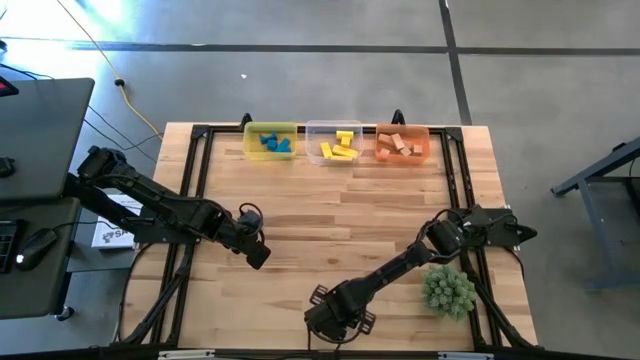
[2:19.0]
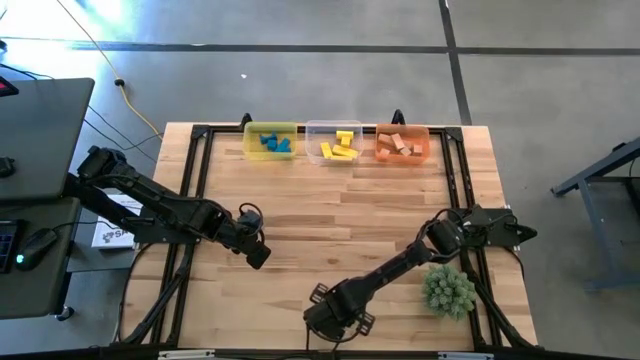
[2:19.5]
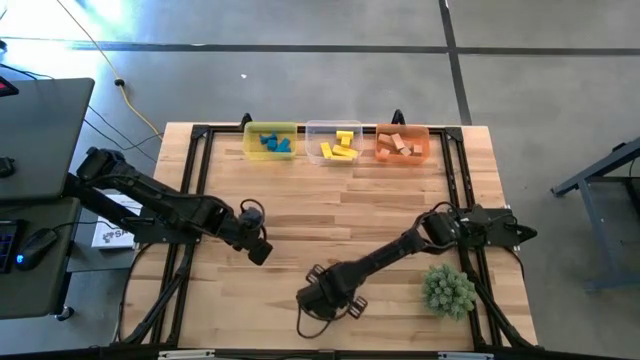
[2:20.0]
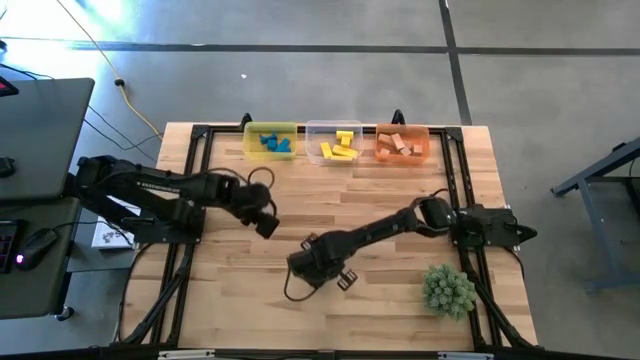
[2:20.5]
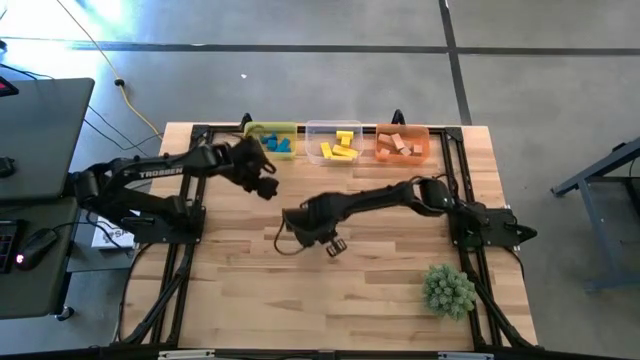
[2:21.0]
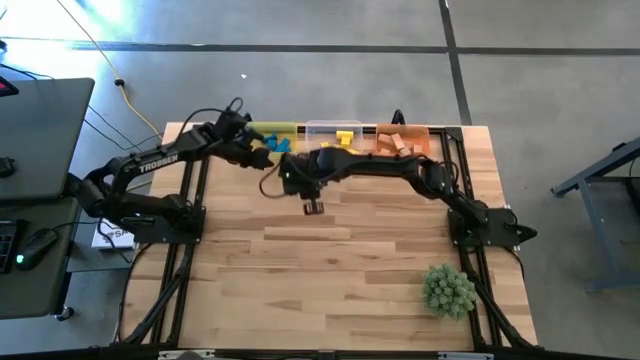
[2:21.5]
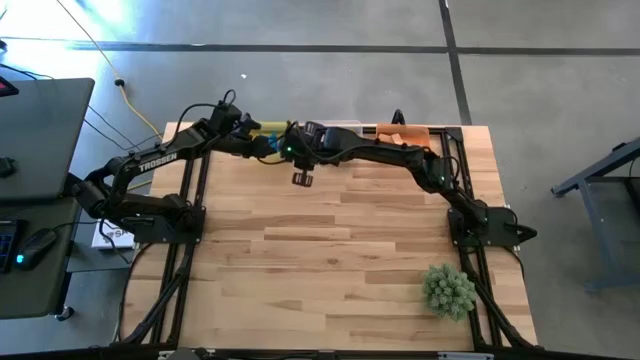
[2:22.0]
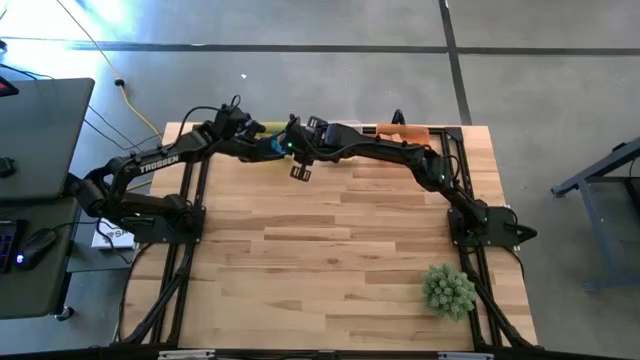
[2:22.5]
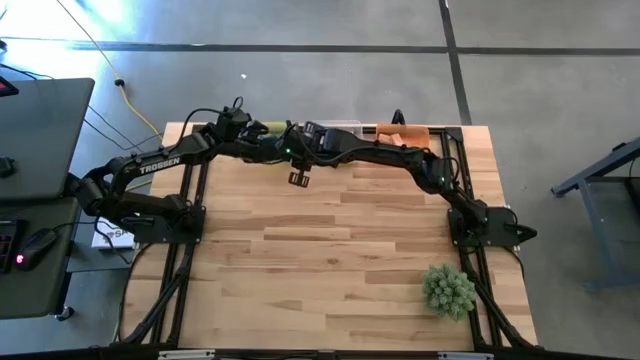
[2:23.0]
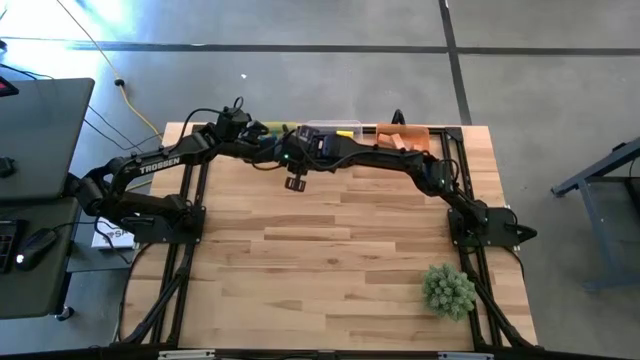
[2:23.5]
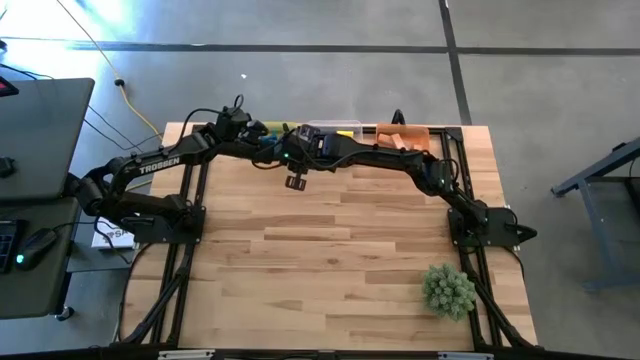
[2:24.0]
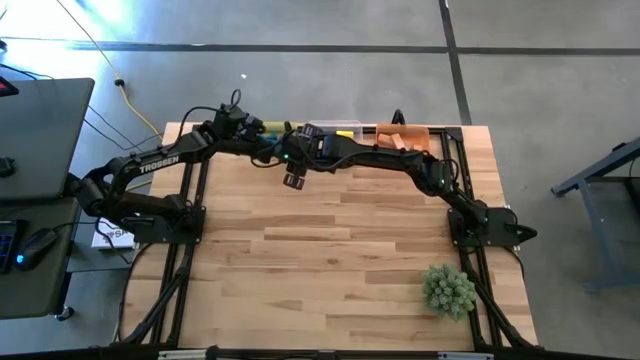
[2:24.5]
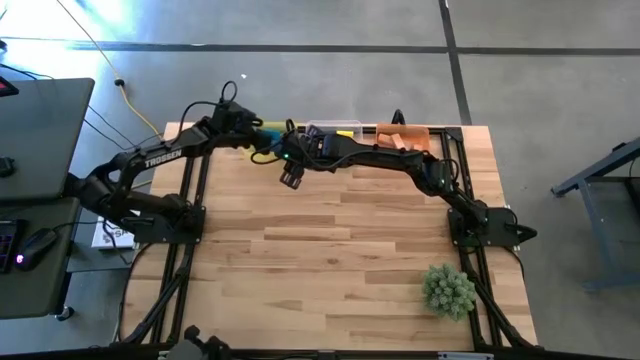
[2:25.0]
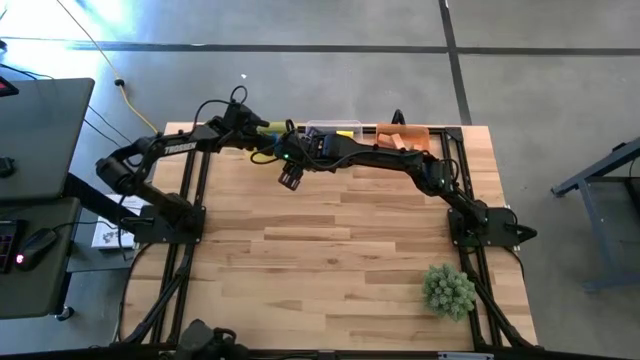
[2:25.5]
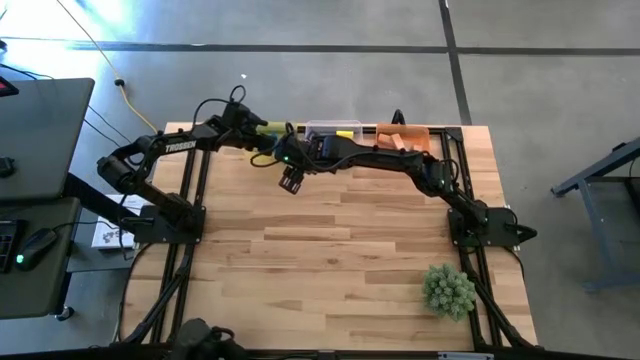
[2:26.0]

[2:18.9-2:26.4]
Task: Sort & place blocks by color
Put the blue block into the yellow bin

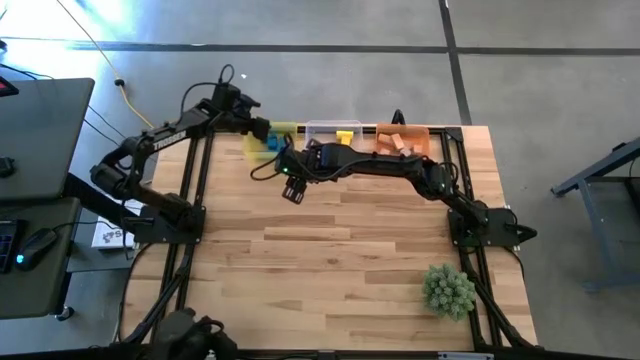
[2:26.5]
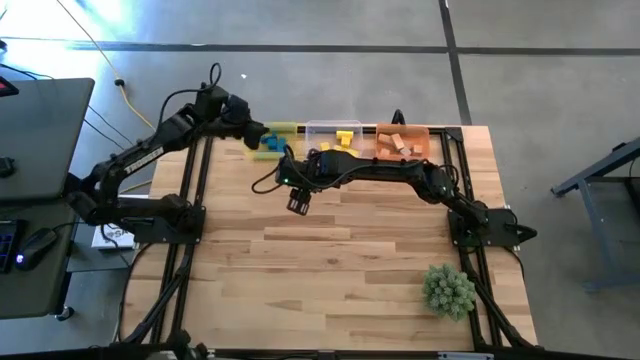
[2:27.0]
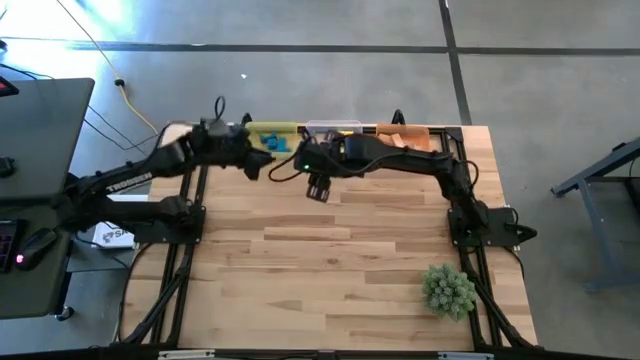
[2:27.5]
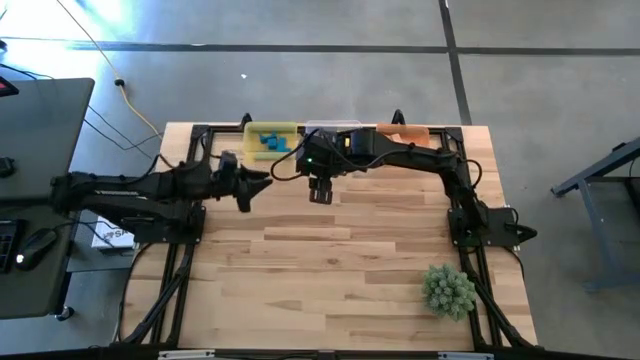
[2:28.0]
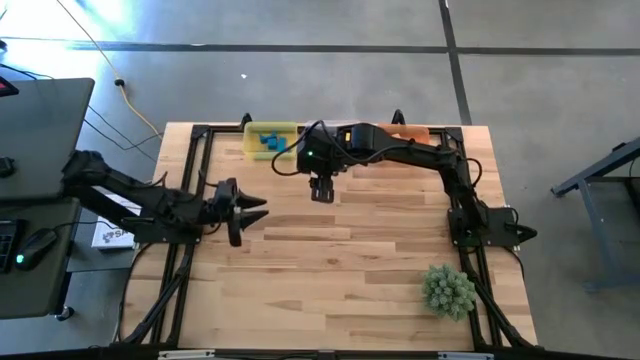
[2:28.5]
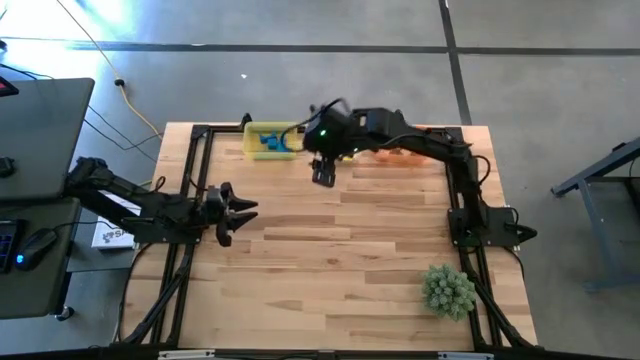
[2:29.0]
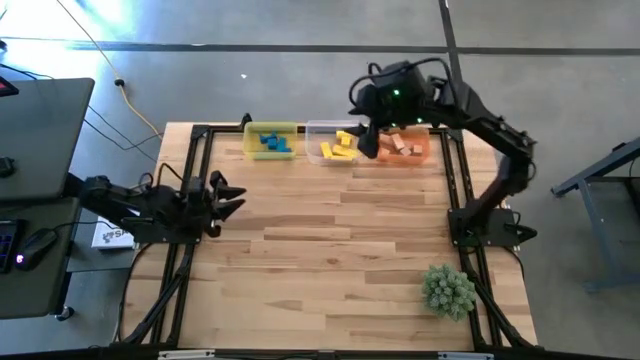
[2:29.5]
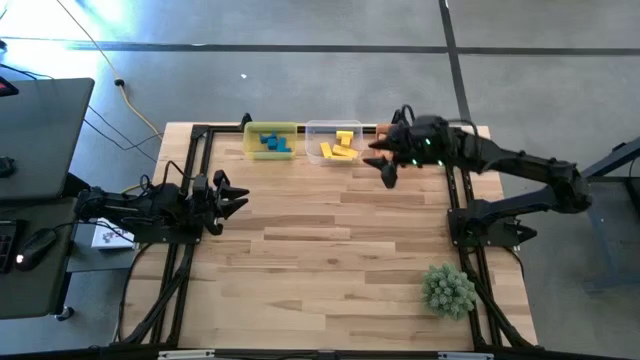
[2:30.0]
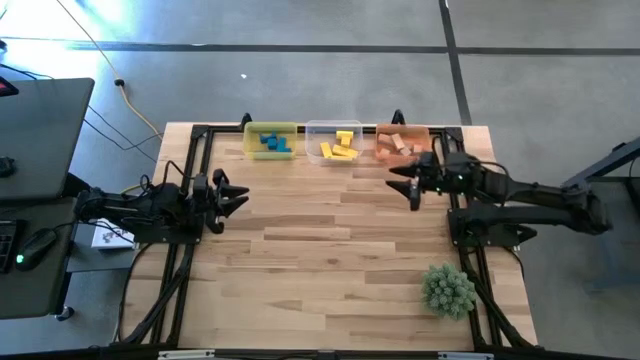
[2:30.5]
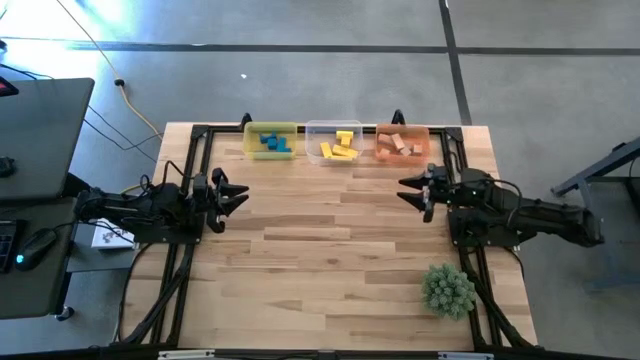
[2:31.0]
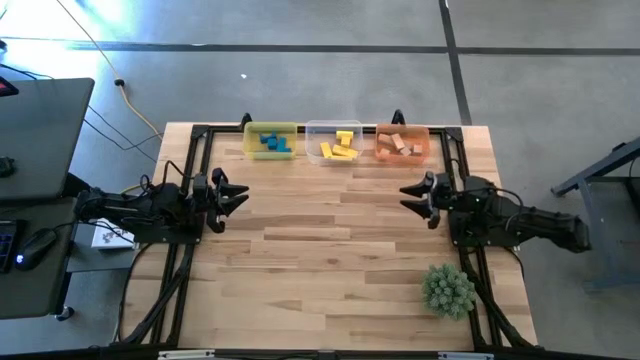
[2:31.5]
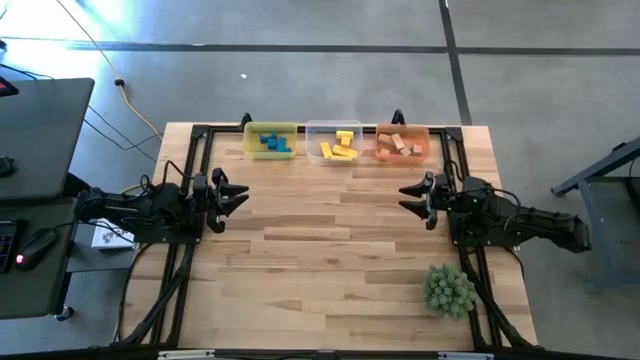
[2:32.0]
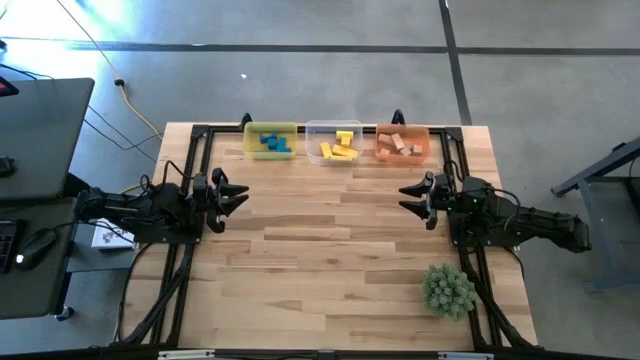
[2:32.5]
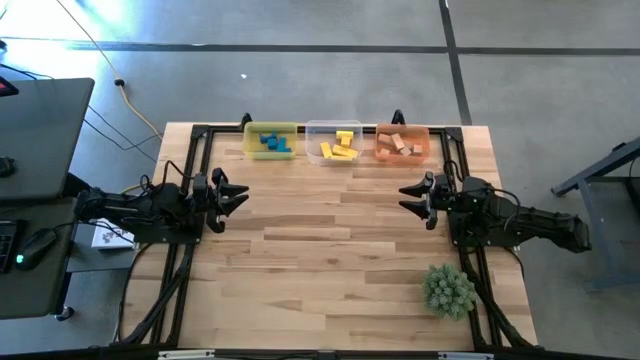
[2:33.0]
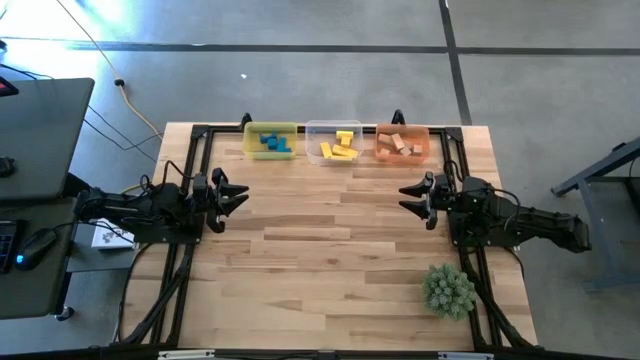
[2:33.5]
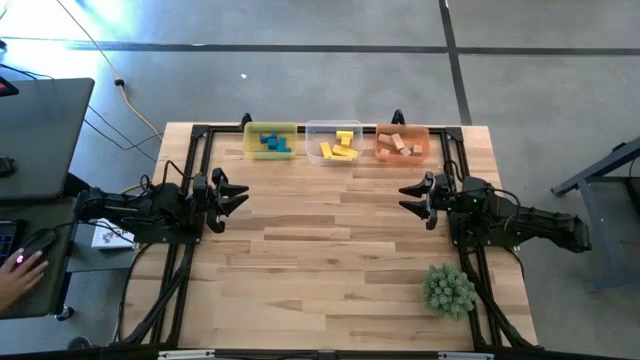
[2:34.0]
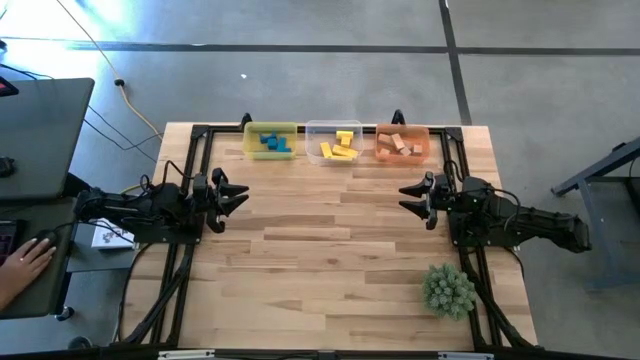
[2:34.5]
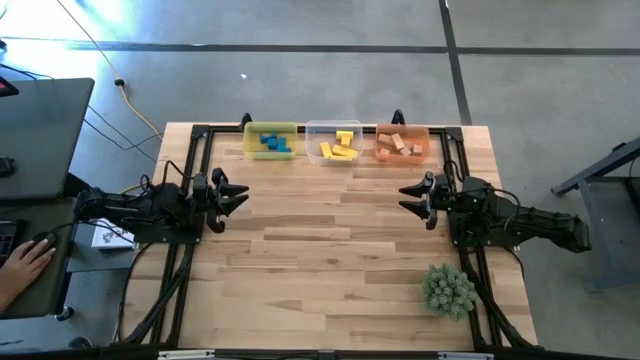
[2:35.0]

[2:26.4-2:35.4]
Return to Home Position

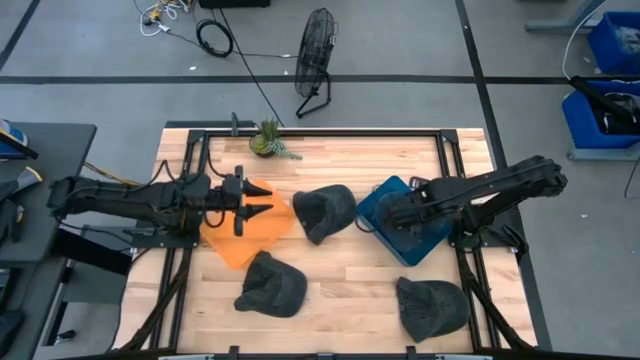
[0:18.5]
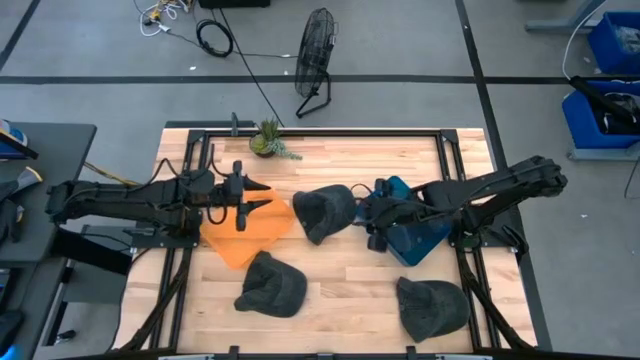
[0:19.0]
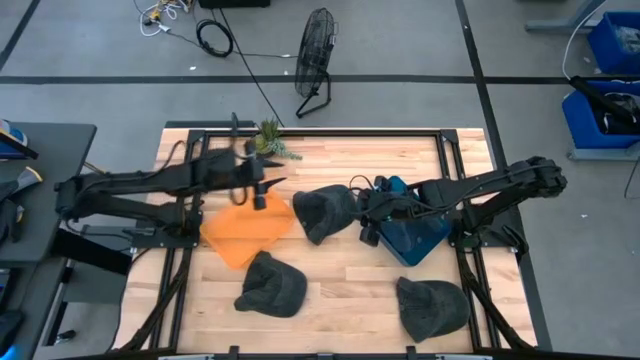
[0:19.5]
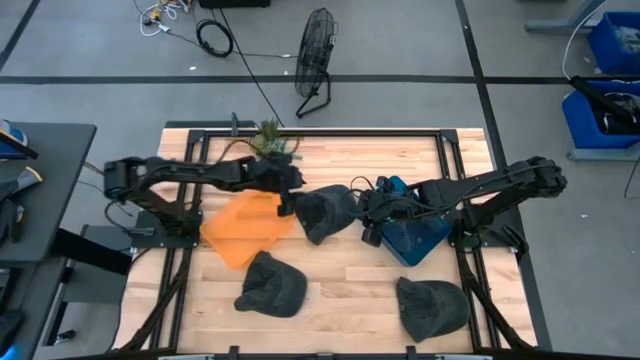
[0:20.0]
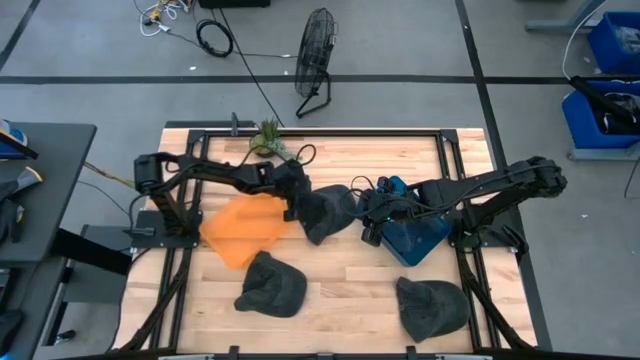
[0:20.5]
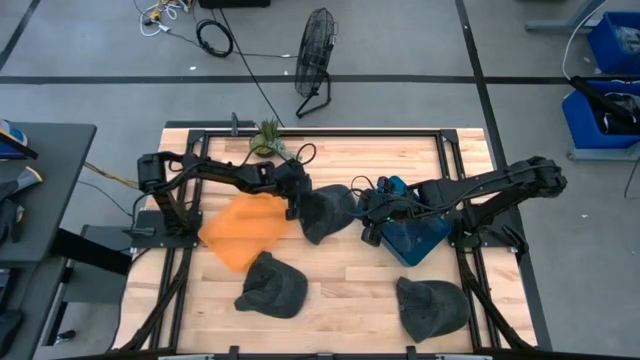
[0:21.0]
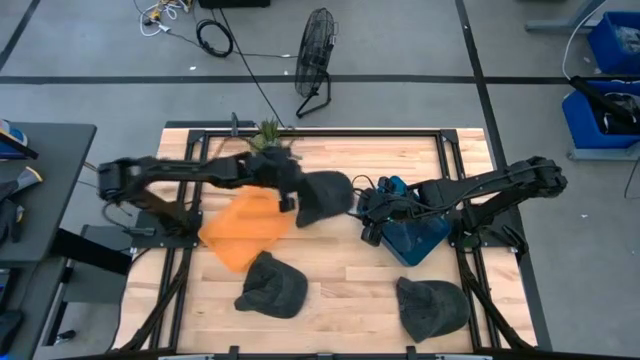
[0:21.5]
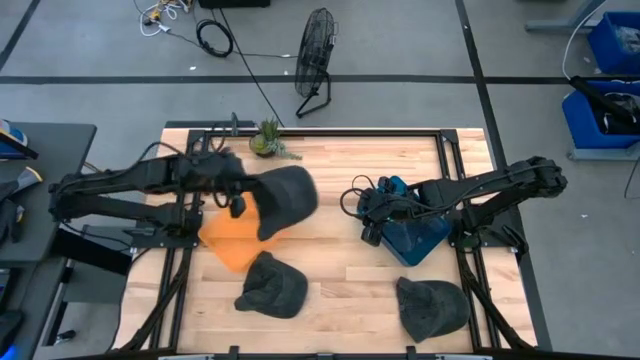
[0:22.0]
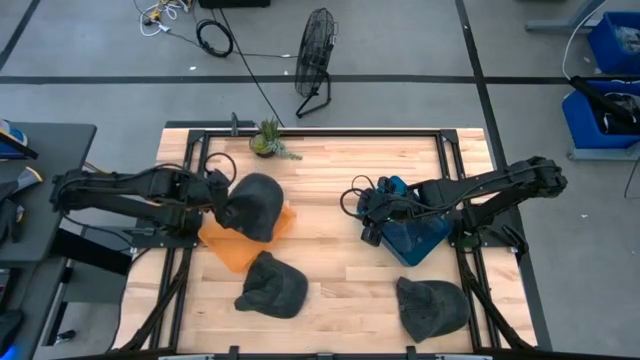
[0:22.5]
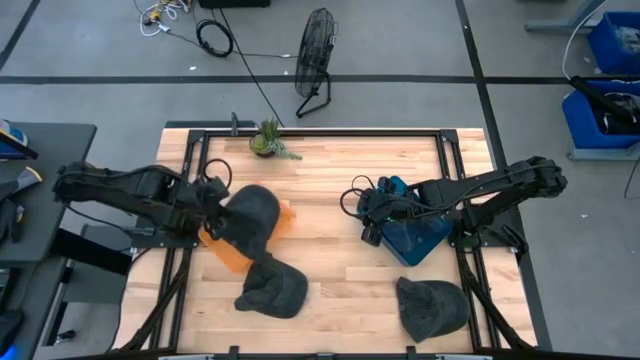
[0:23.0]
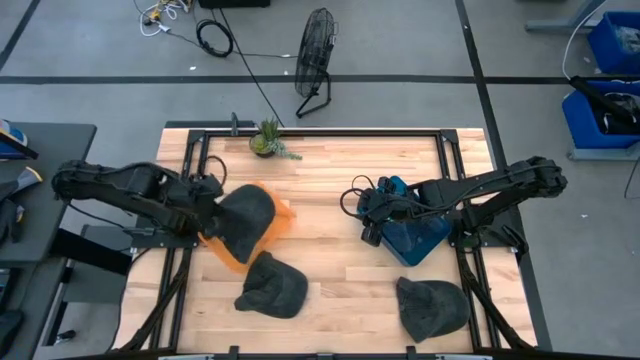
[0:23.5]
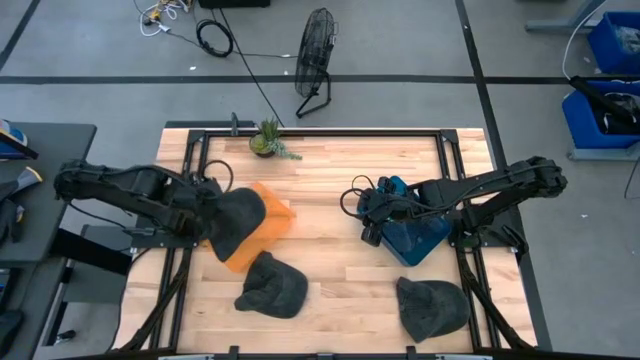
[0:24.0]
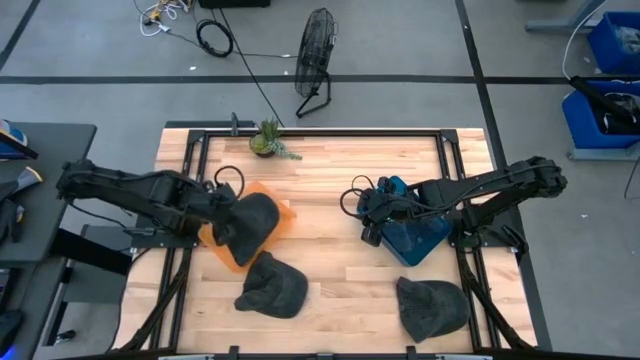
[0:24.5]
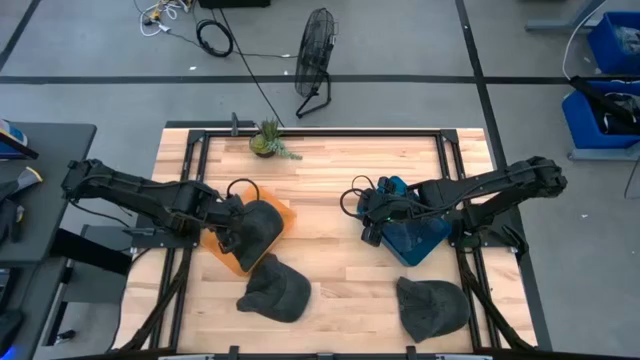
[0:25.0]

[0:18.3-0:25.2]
Task: Pick & Place hat
Put the top black cap into the orange bin
